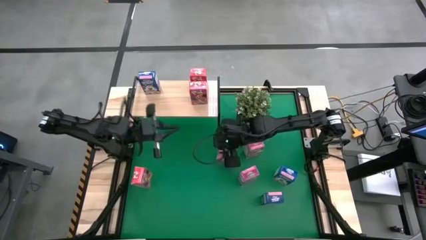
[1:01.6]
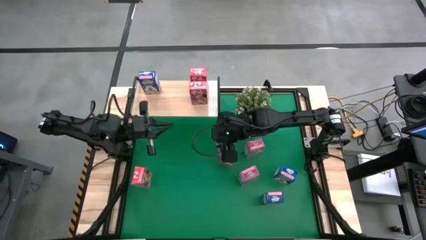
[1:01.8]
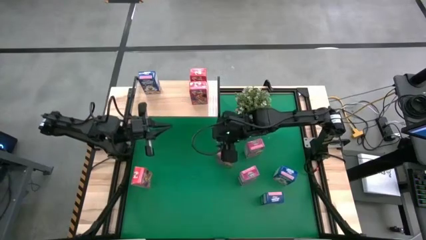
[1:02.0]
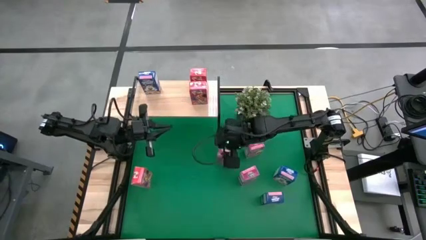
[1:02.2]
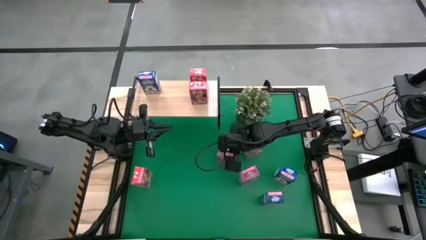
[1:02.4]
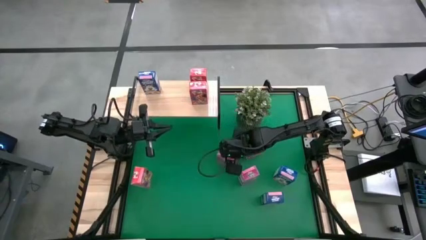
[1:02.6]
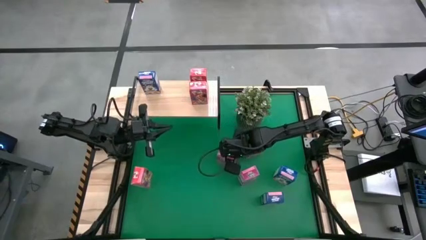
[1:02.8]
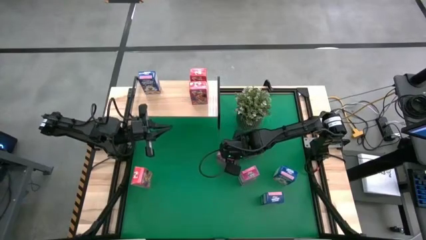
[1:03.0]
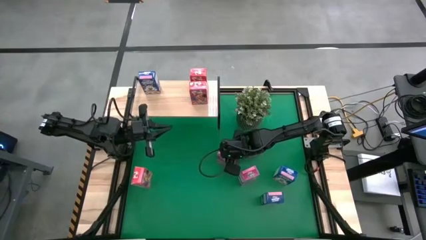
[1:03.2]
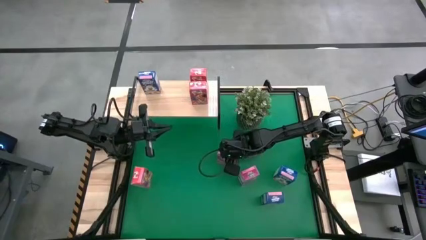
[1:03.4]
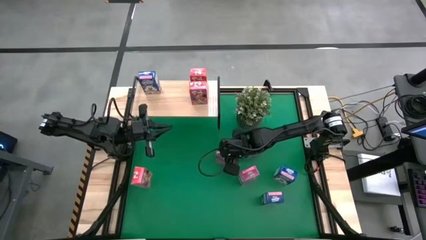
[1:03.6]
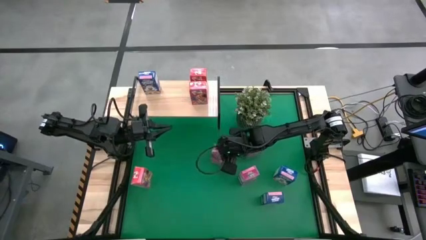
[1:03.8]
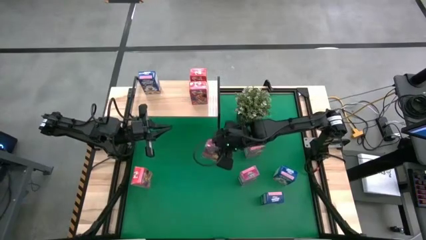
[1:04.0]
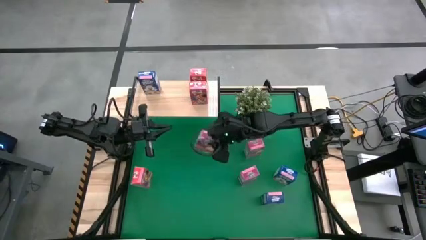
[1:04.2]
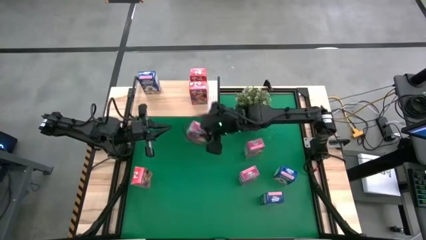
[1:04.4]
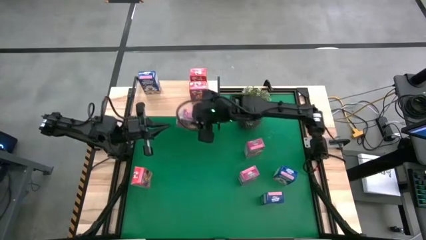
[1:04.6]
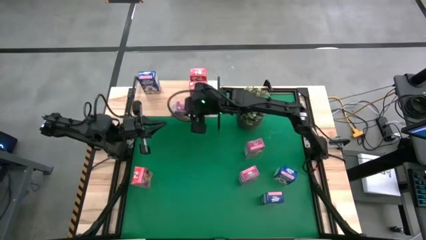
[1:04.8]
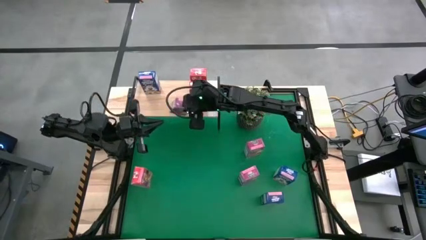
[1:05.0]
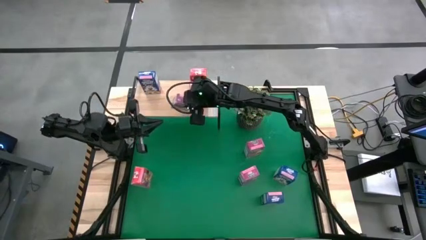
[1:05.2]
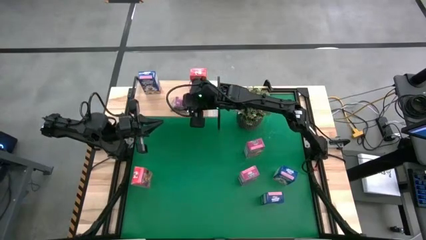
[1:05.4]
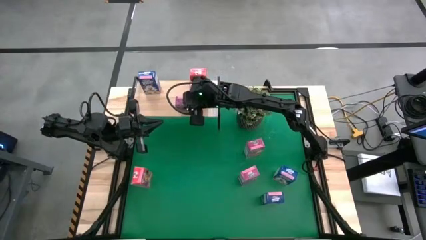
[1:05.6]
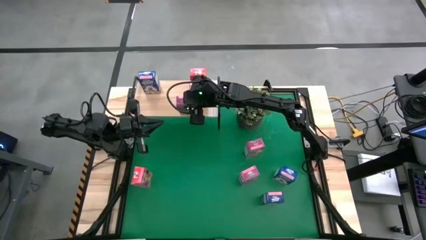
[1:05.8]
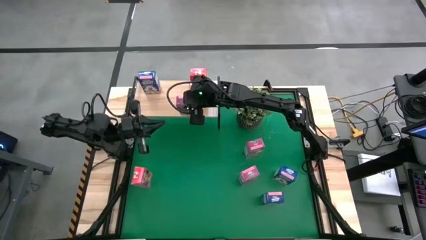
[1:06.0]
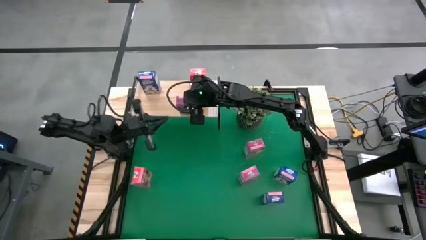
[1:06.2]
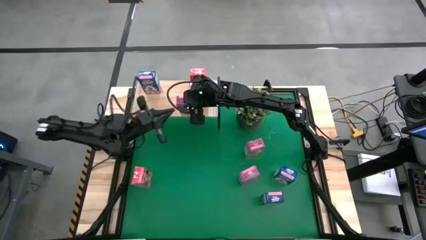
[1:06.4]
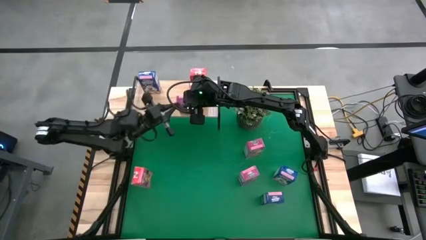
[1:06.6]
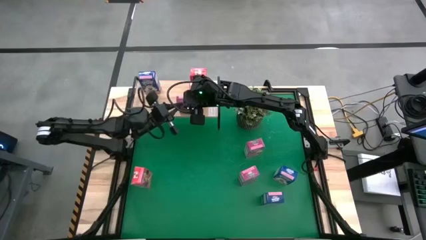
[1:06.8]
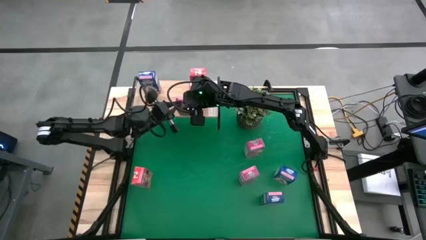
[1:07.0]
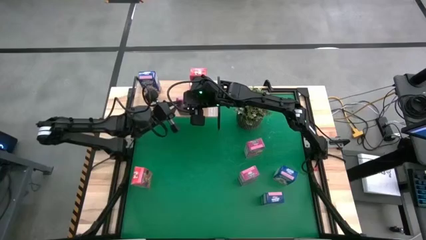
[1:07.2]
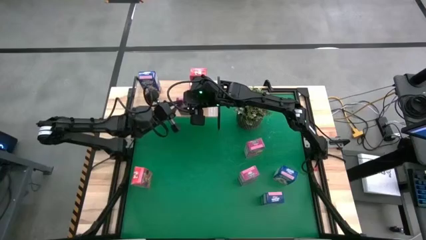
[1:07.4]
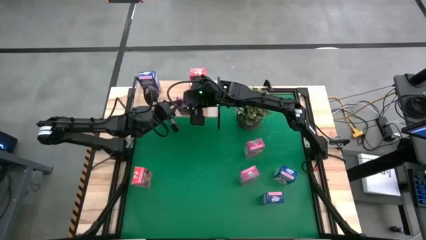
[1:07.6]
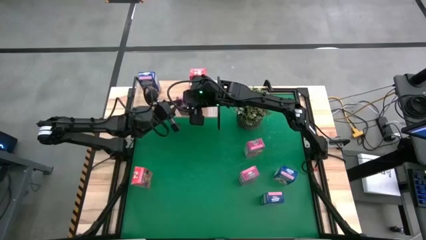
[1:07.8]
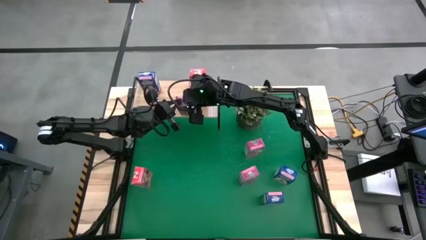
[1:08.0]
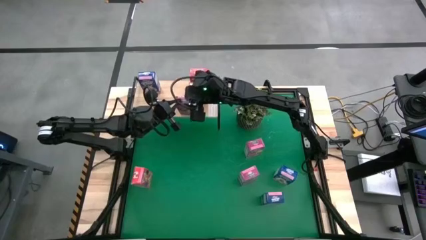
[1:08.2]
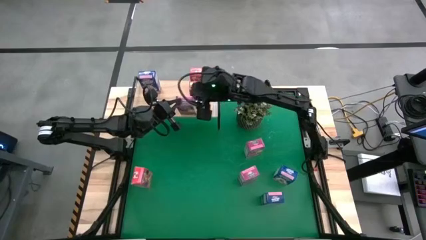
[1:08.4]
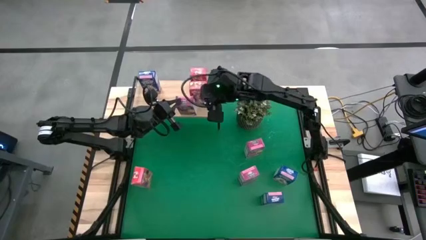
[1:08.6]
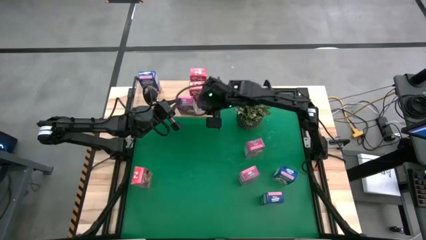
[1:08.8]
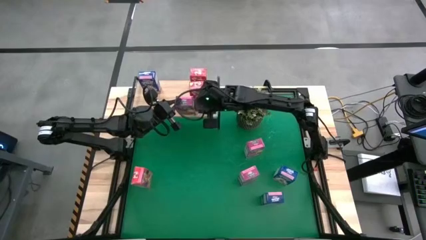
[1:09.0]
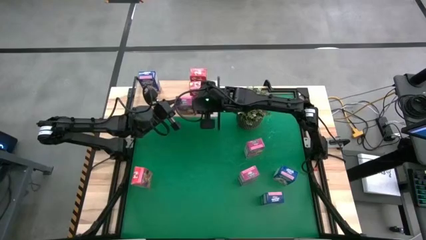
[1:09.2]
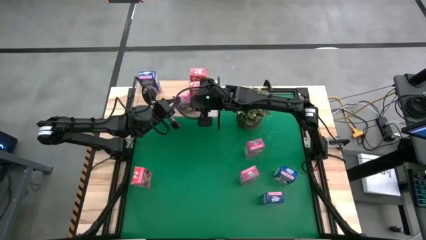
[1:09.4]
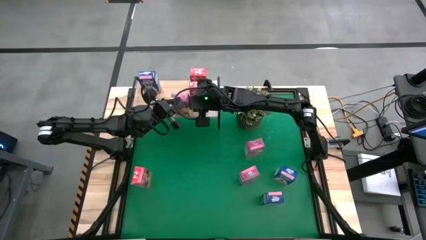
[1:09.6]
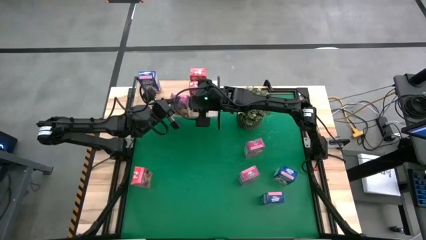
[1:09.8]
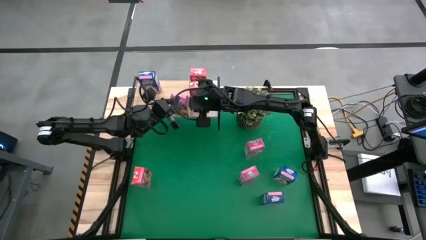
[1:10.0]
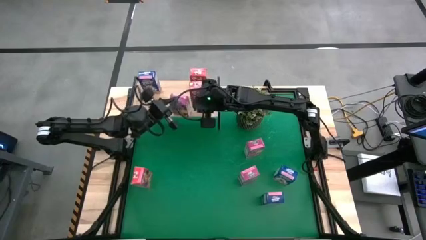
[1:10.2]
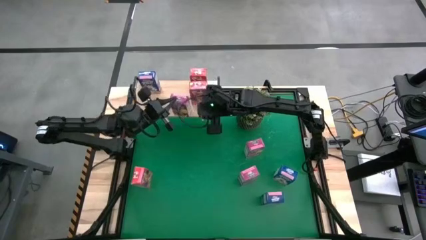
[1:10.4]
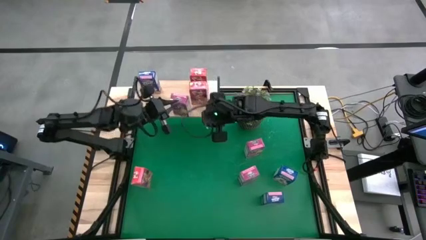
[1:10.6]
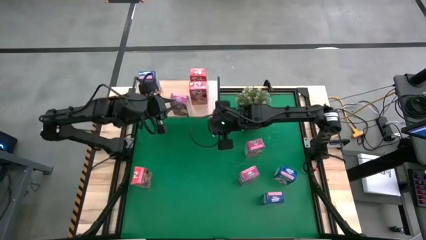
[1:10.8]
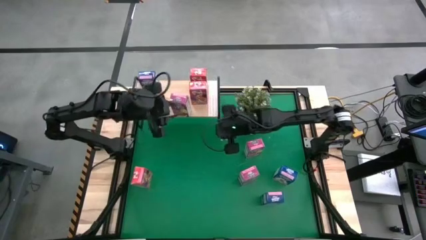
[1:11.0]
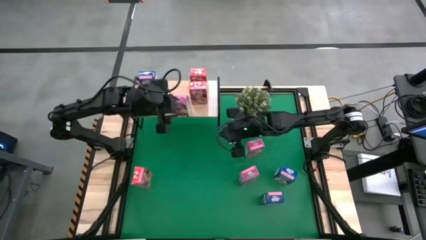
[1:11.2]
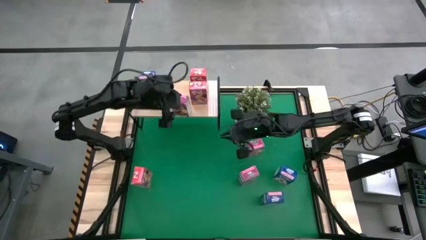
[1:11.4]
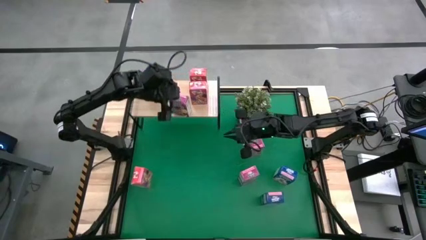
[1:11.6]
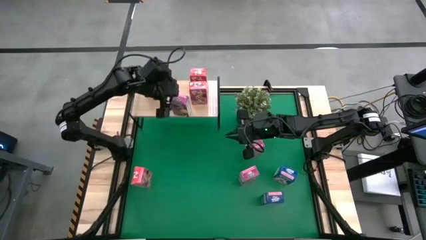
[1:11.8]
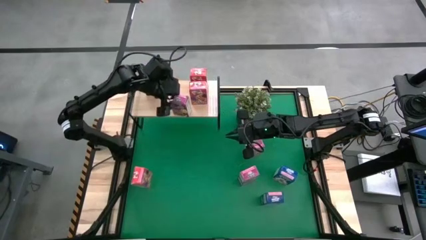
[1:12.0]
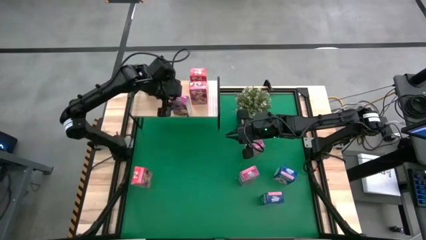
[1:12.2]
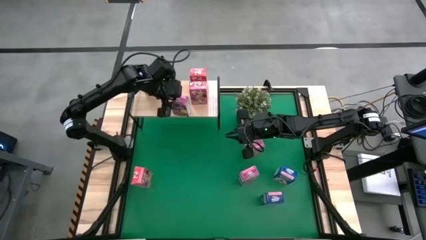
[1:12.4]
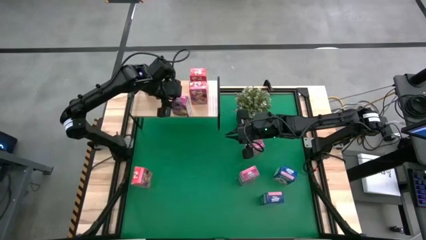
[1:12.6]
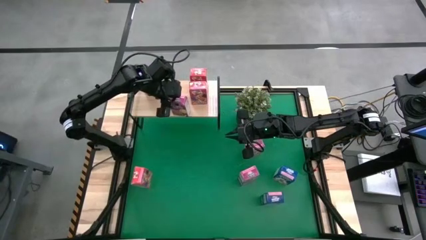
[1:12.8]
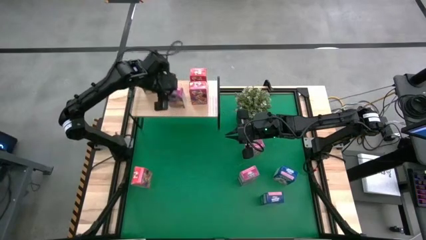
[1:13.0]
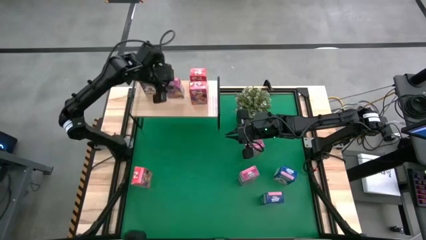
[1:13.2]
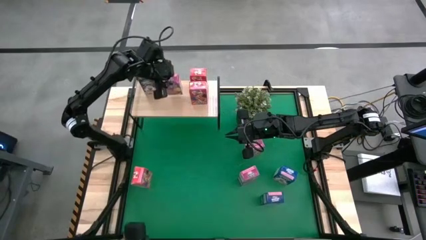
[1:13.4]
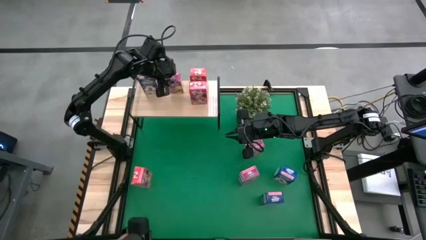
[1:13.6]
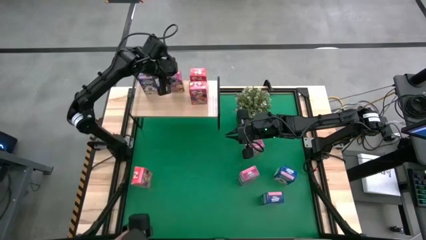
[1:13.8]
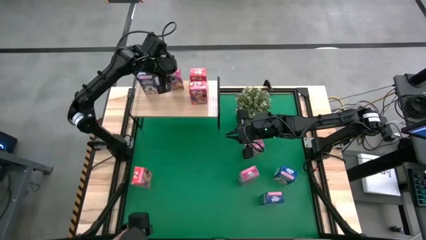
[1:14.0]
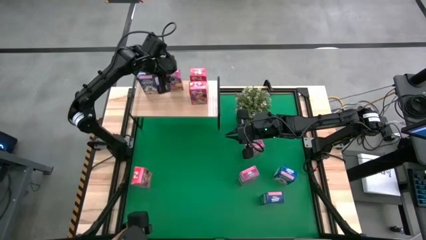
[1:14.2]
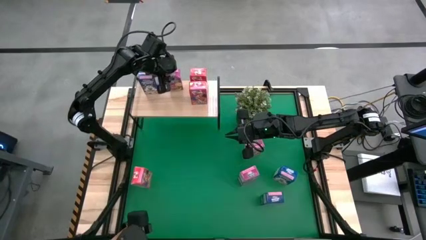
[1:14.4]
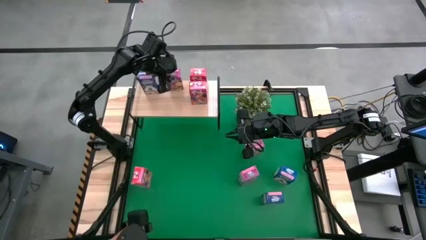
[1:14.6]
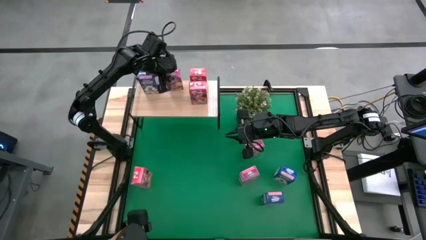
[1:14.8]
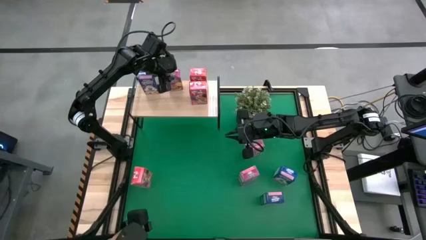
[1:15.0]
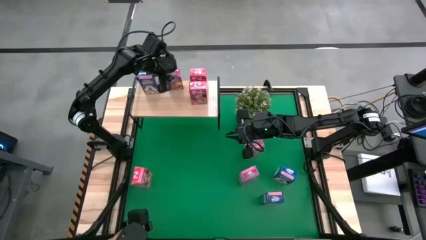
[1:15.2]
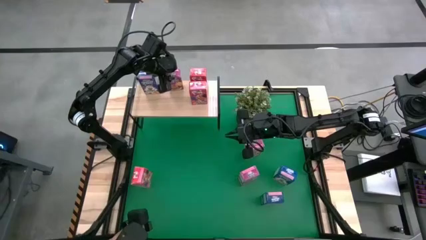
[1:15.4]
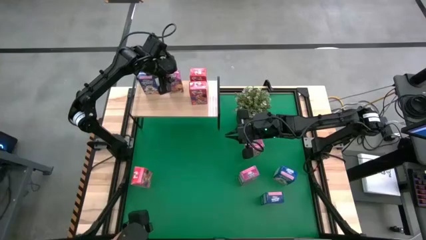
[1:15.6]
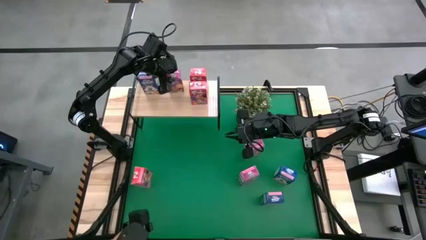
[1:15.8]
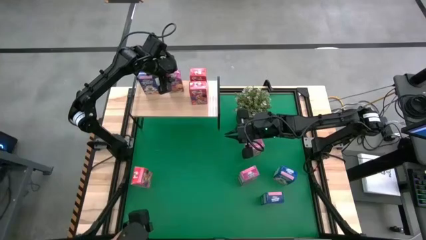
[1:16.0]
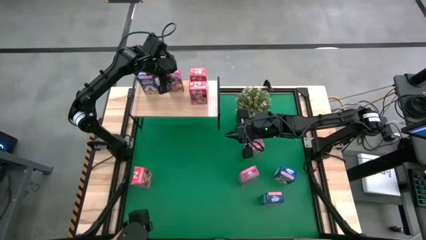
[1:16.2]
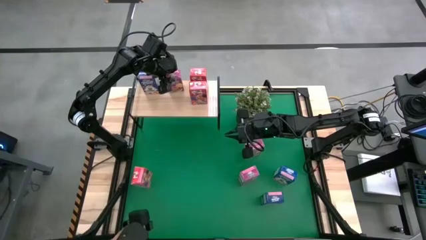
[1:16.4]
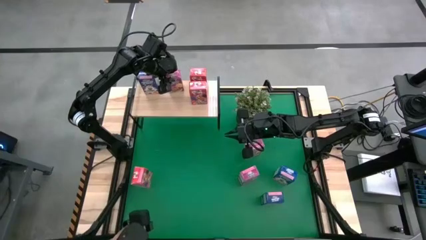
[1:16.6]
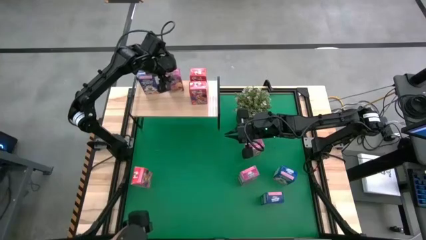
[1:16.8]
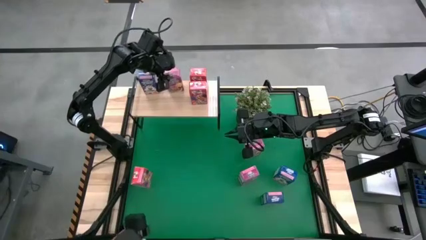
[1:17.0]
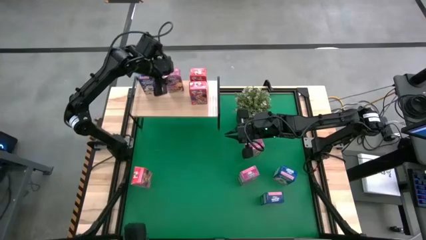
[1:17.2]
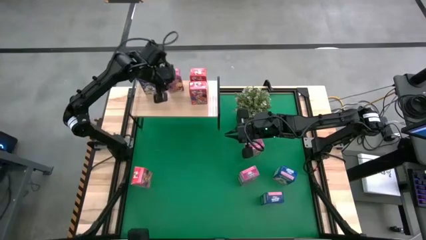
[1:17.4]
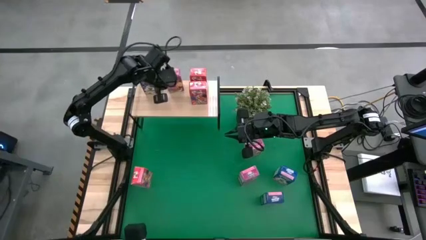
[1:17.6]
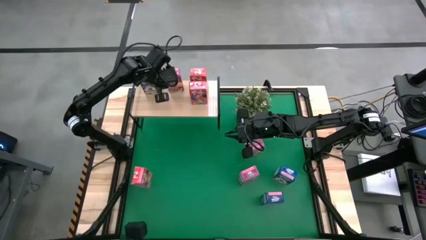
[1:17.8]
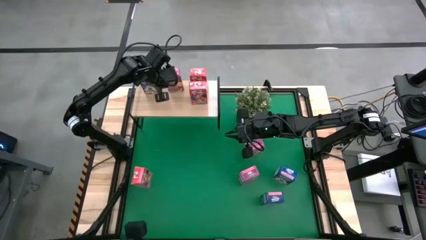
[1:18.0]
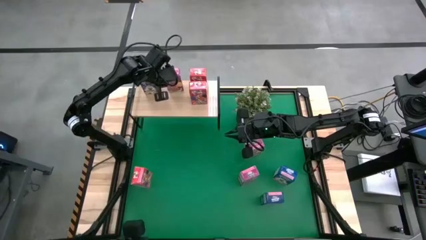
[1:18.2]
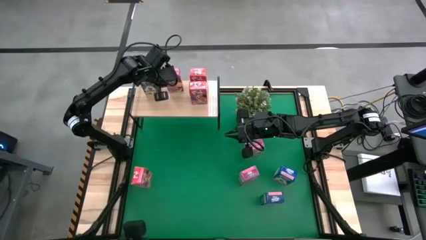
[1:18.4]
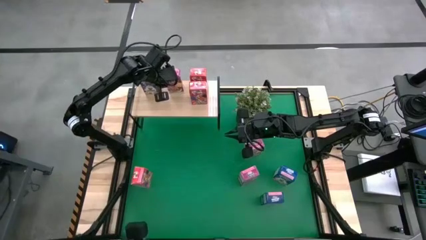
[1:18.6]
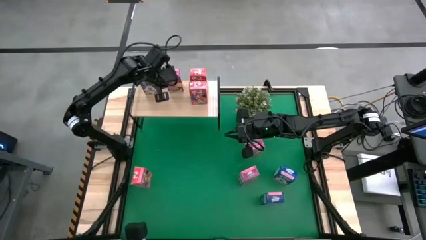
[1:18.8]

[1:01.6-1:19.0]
Task: Stack cereal on shelf
Put the left pink cereal box on the shelf
